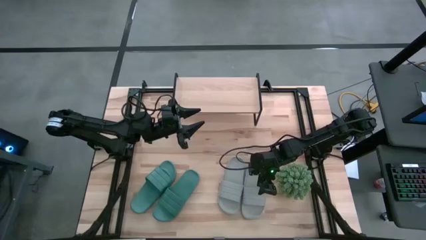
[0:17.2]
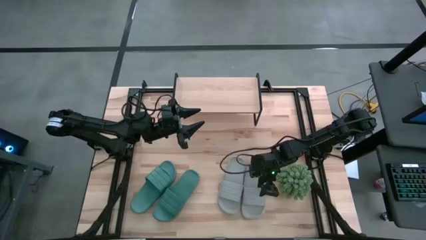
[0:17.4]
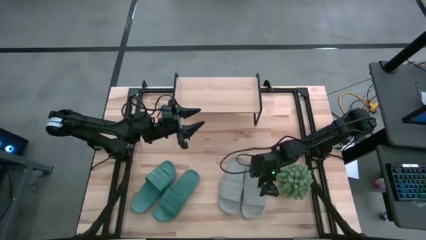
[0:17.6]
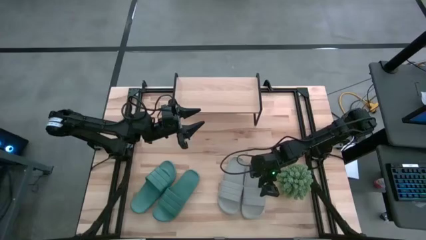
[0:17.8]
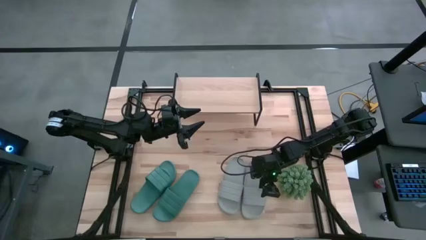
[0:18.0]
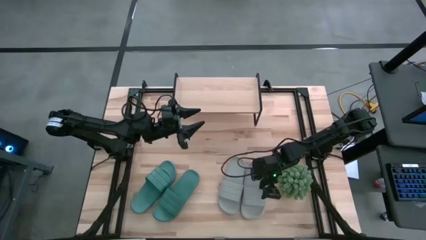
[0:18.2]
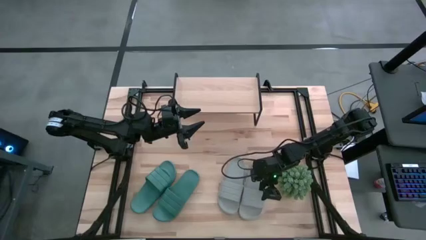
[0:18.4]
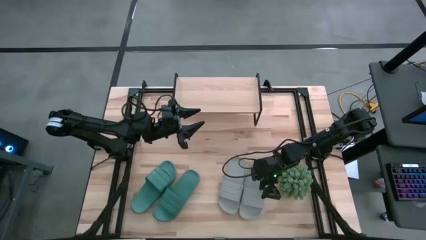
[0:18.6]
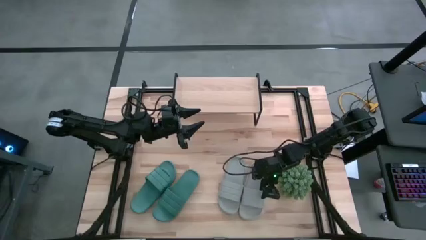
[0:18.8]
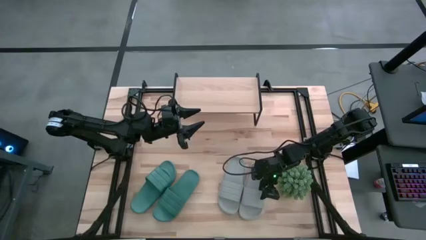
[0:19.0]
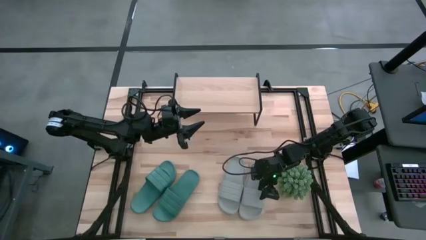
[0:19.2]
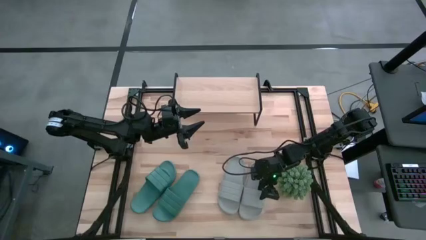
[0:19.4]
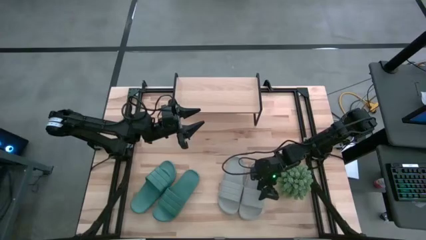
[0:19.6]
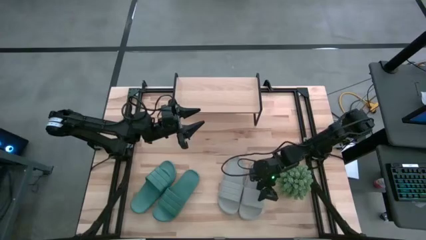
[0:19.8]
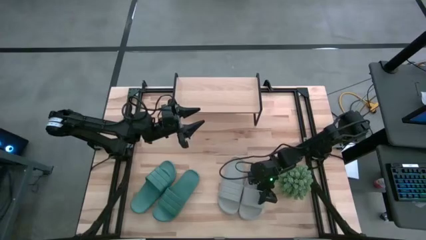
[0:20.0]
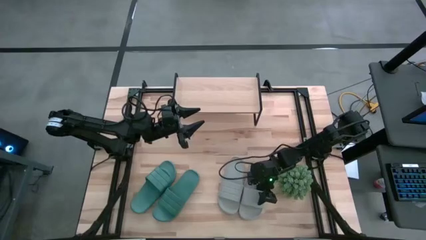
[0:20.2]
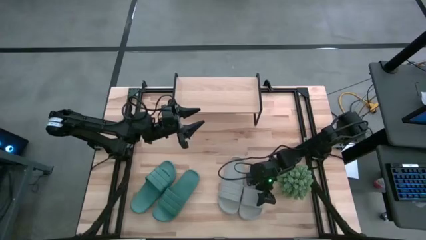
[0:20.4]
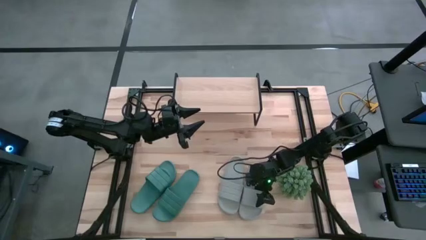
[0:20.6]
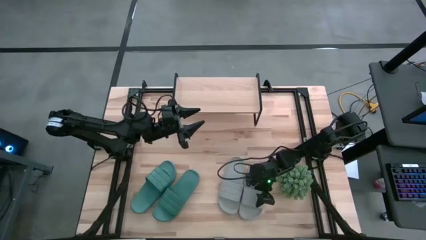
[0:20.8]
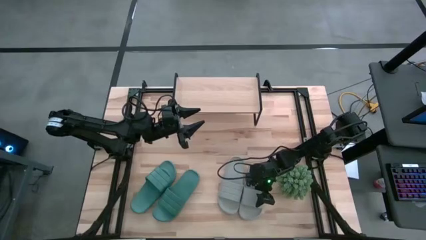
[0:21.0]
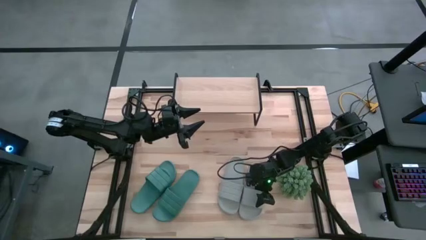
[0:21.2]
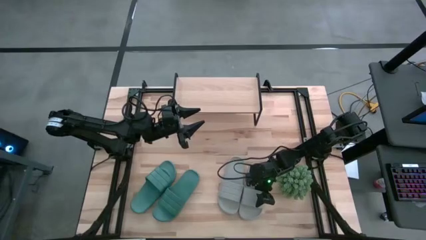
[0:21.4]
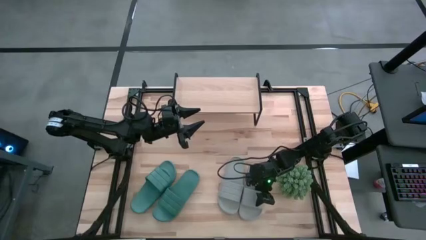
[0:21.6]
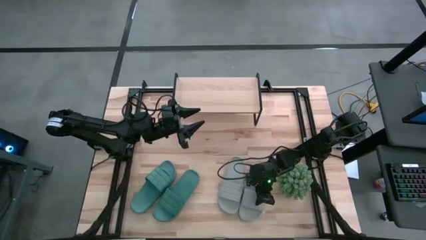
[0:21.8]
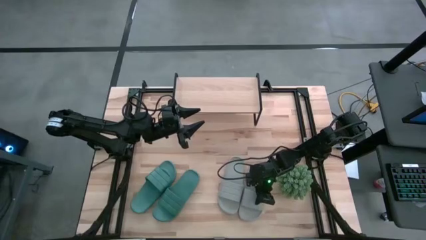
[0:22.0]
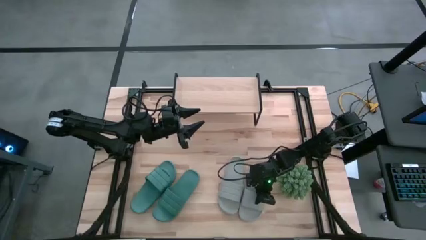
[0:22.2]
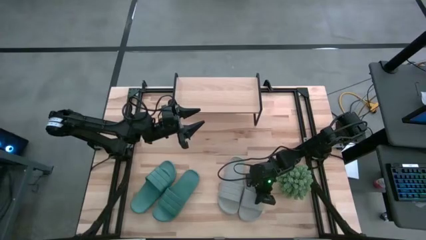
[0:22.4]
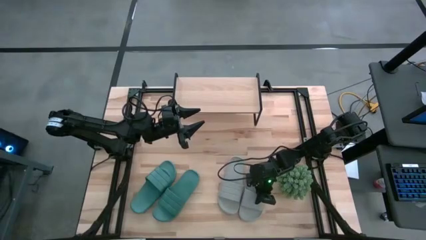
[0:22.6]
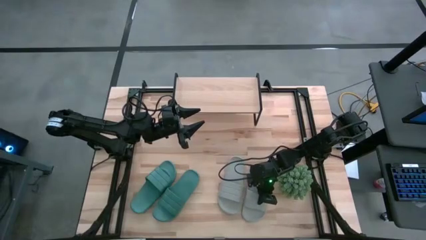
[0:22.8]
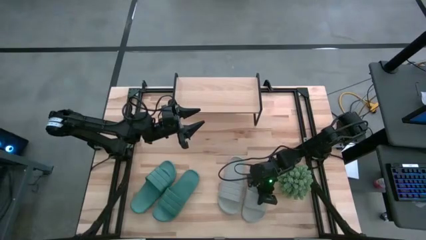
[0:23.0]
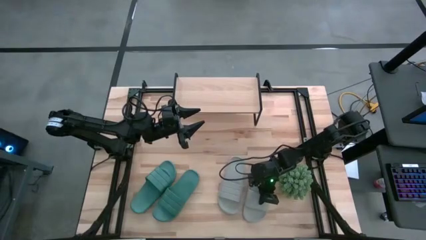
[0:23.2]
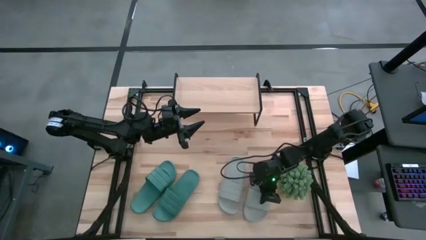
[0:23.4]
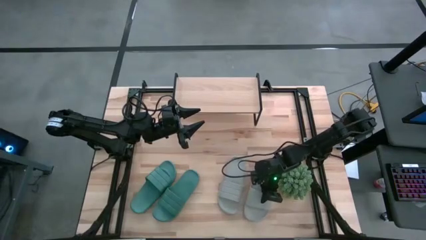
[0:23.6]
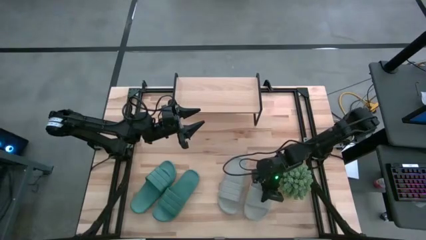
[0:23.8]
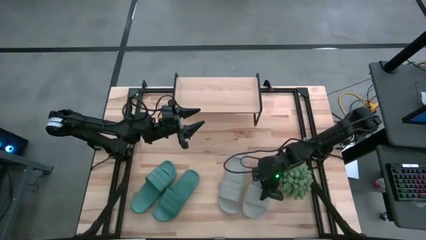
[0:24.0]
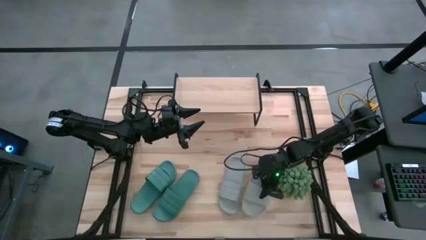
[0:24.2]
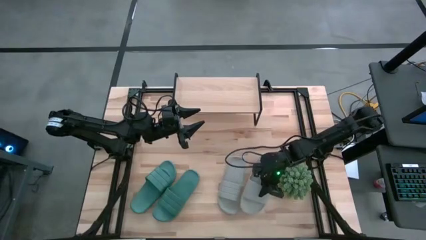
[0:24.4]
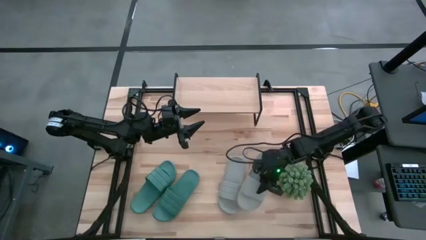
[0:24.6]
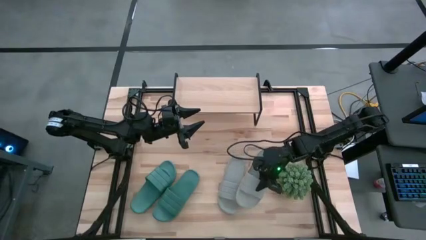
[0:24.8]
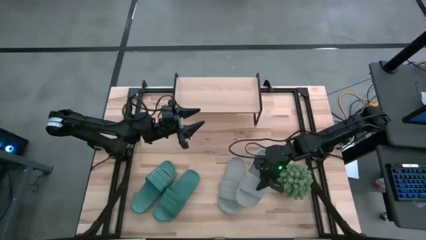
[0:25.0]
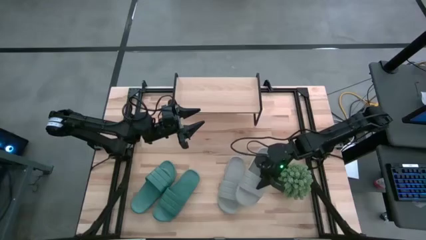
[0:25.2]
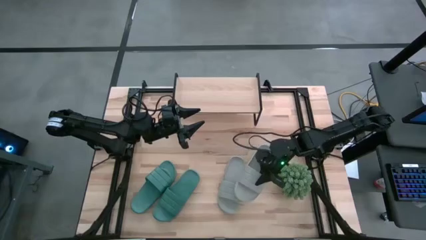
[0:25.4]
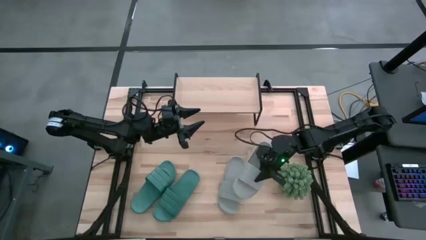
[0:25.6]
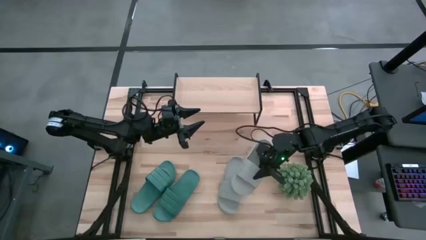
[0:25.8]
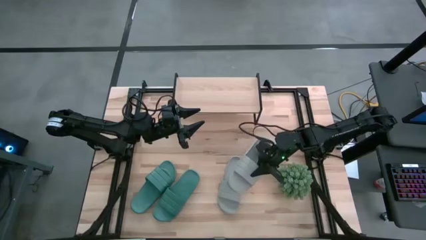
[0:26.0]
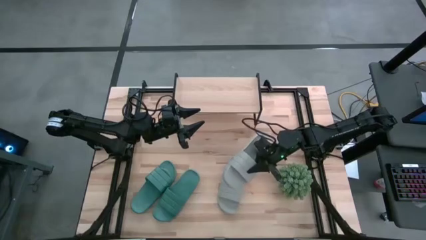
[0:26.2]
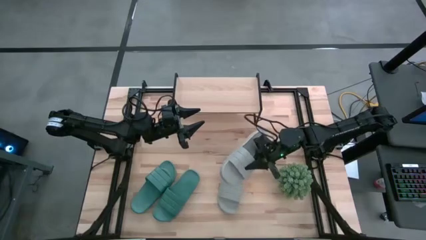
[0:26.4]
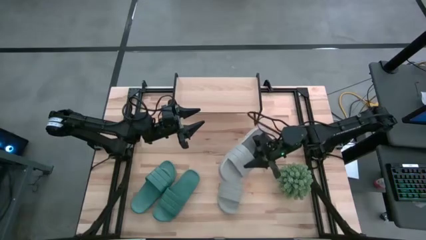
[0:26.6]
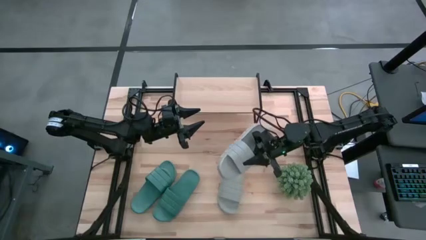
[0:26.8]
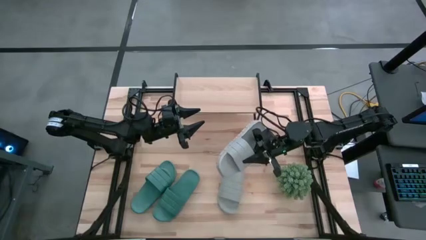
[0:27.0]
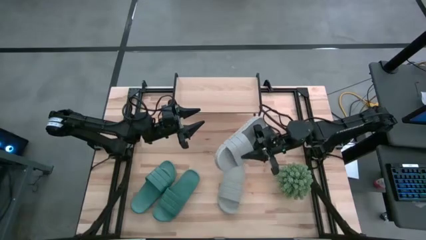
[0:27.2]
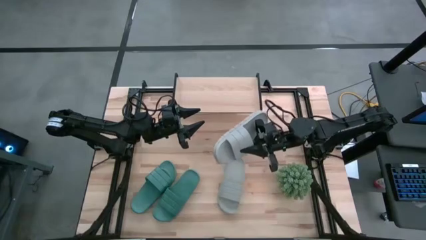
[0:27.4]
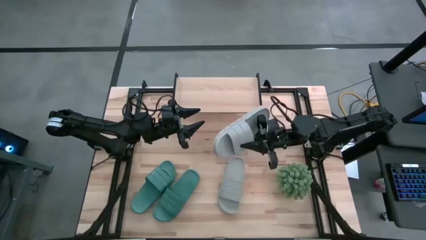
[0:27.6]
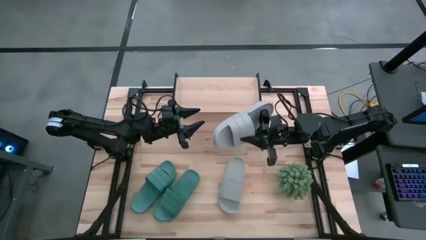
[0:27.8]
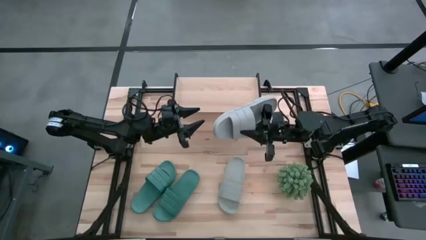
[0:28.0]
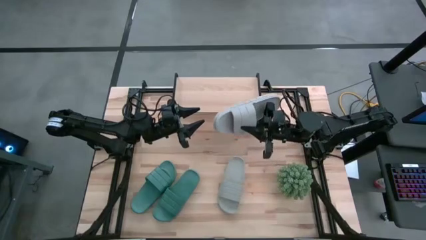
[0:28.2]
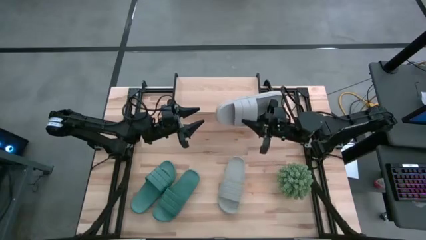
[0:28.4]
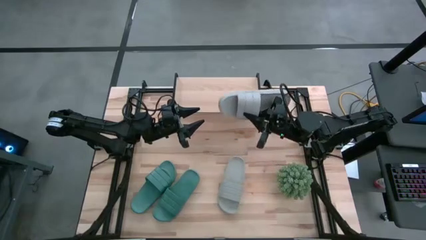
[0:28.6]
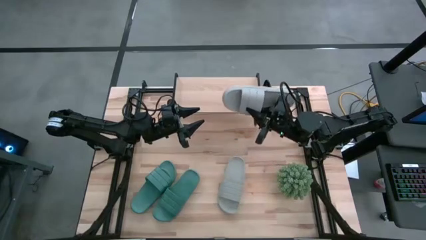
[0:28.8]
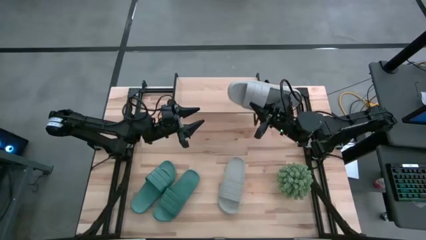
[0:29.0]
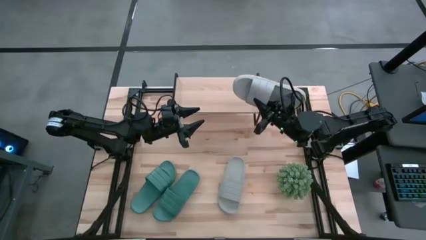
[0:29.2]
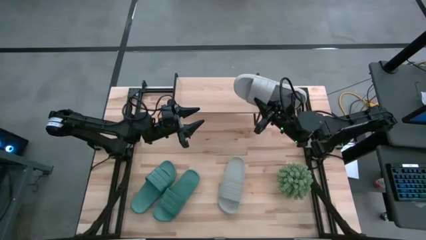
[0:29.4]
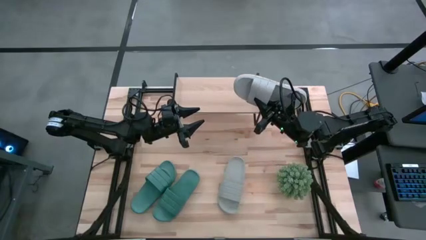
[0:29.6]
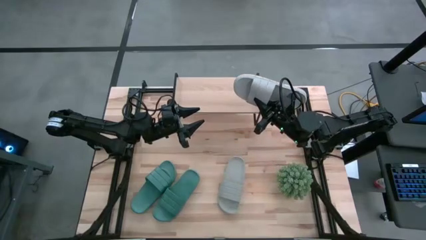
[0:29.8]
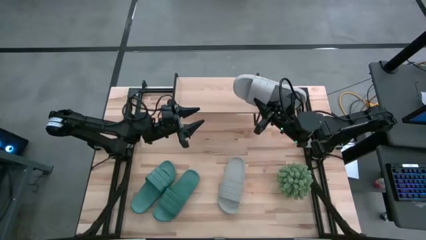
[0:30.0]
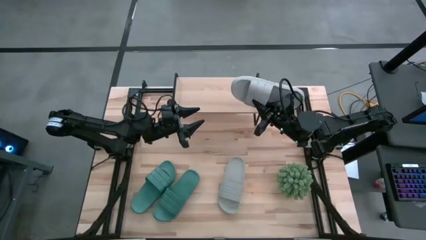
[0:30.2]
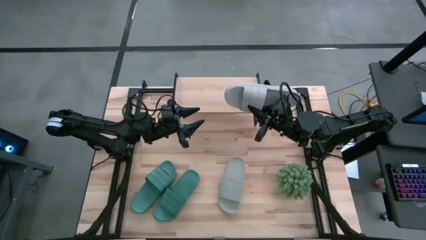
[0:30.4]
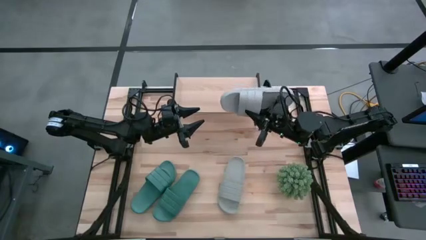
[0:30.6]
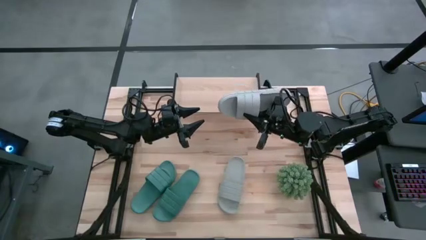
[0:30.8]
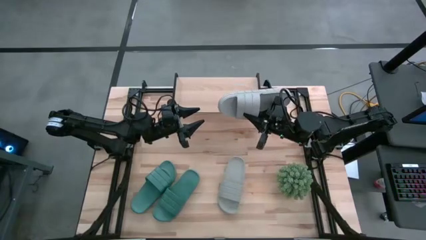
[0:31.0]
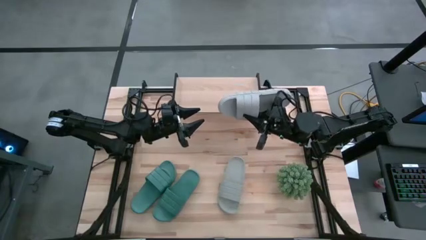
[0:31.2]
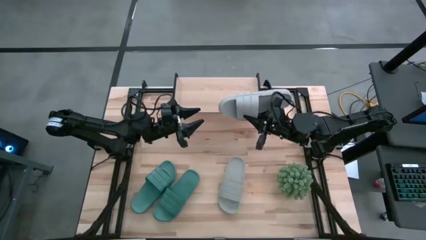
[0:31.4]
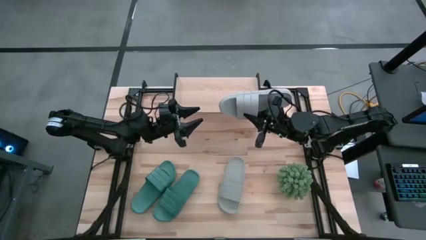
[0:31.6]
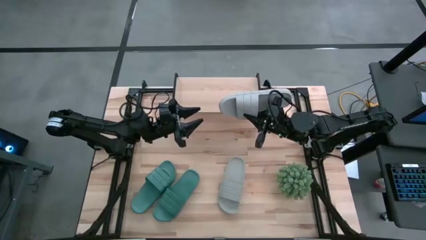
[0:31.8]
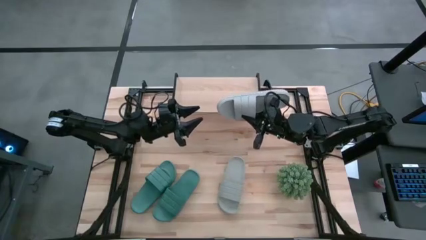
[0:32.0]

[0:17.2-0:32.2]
Task: Pick and place slides into the shelf
Put the right gray slide on the shelf
